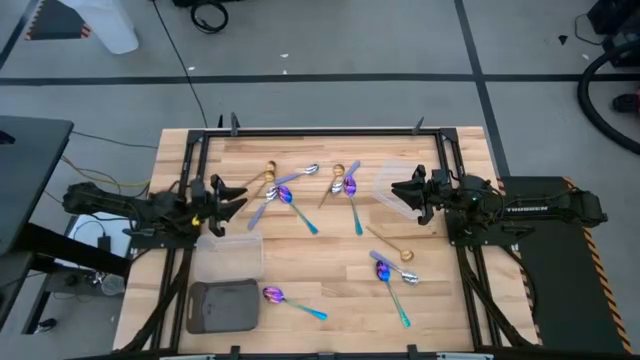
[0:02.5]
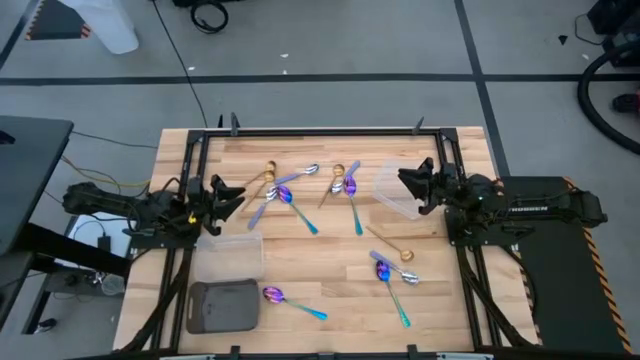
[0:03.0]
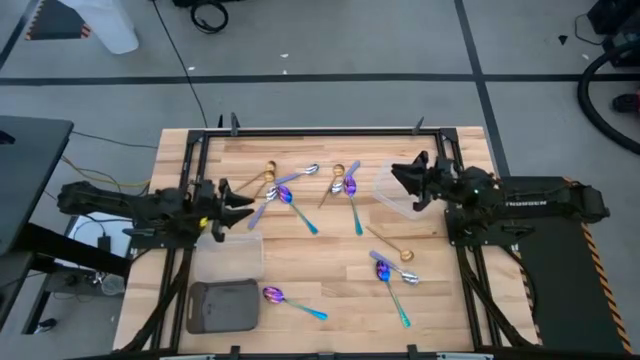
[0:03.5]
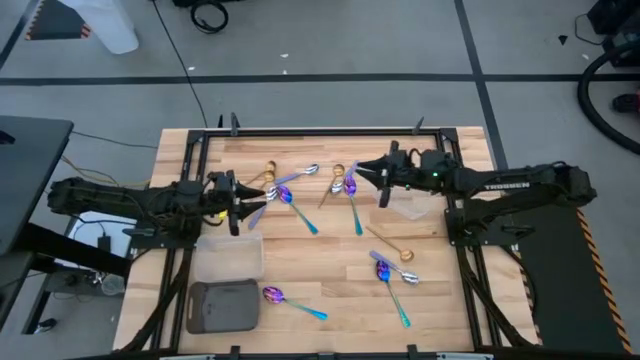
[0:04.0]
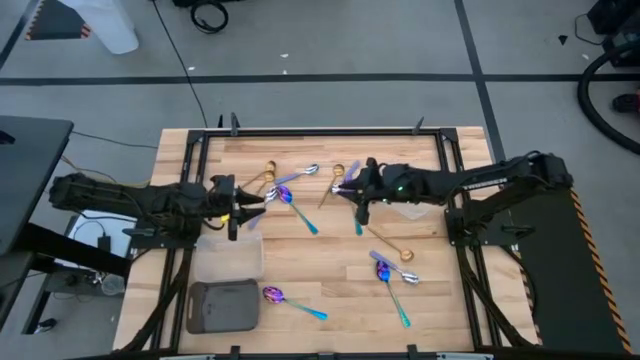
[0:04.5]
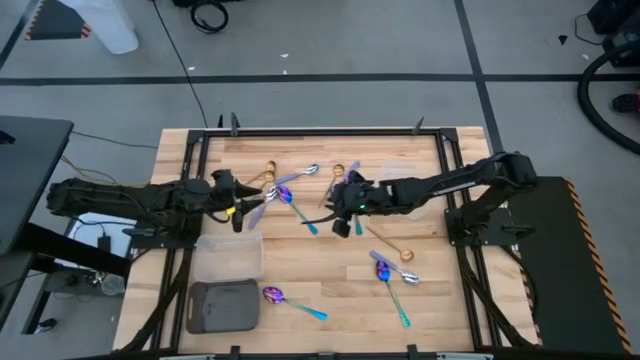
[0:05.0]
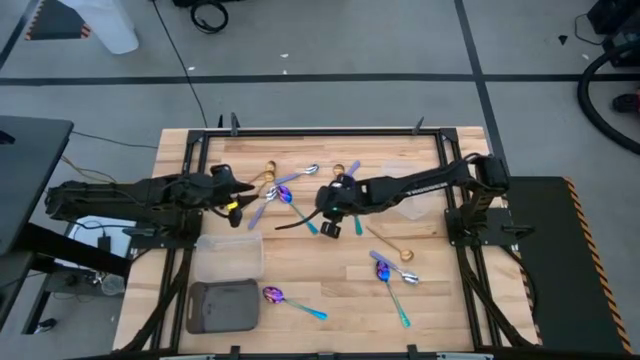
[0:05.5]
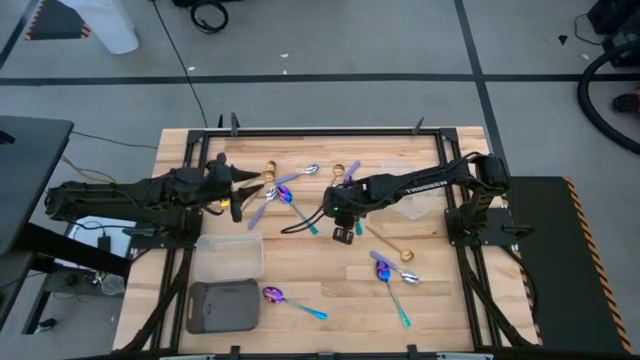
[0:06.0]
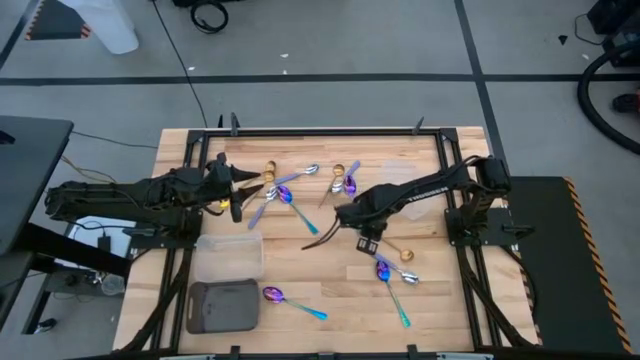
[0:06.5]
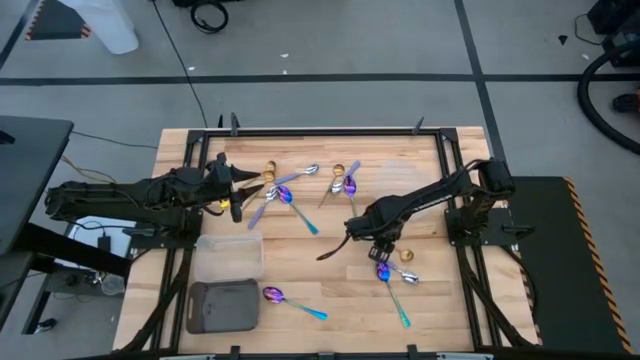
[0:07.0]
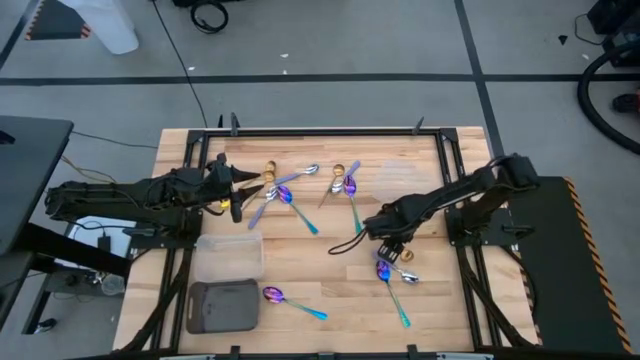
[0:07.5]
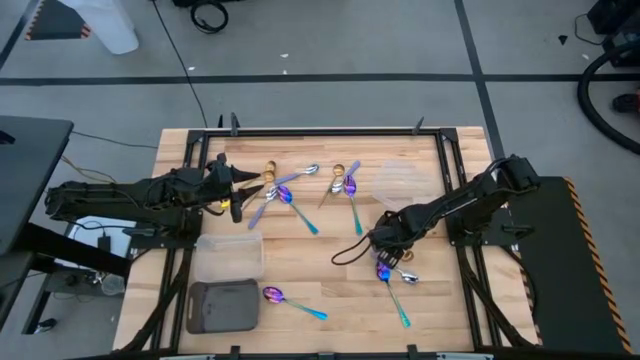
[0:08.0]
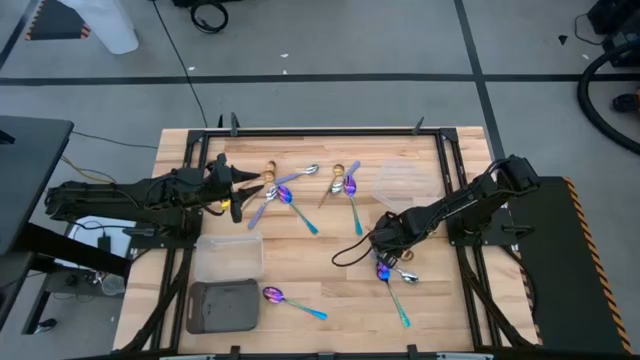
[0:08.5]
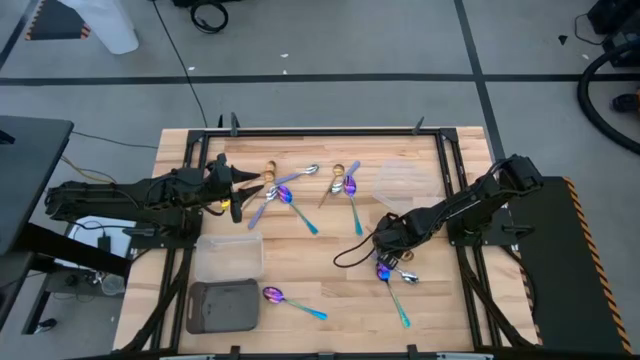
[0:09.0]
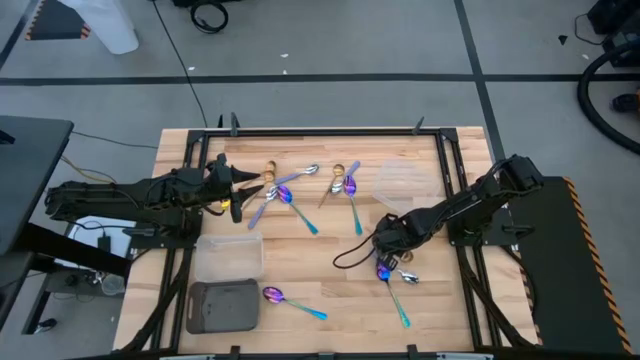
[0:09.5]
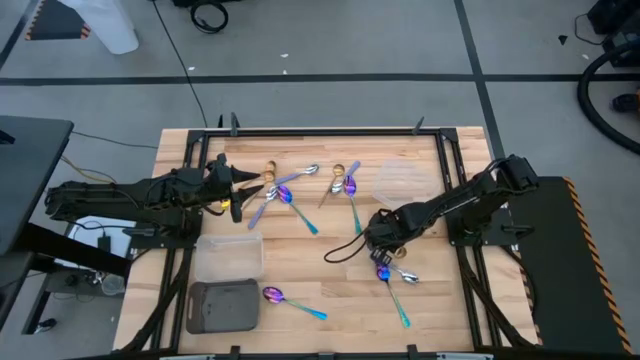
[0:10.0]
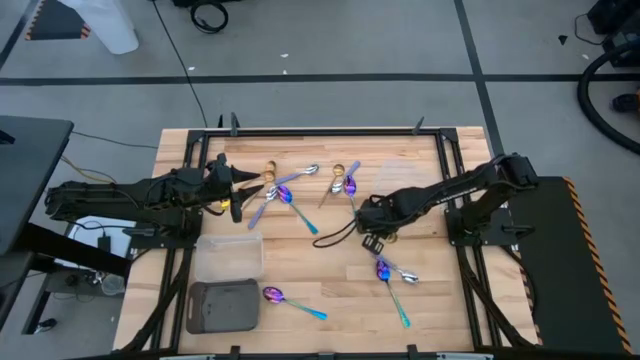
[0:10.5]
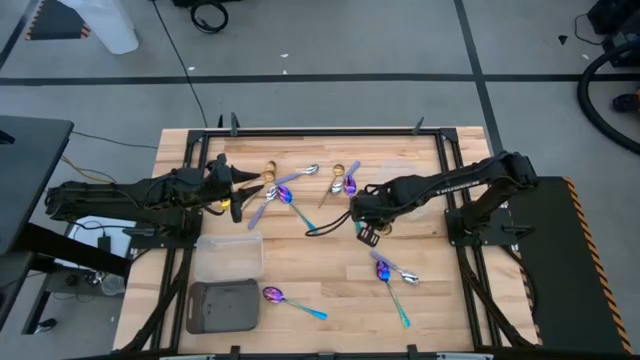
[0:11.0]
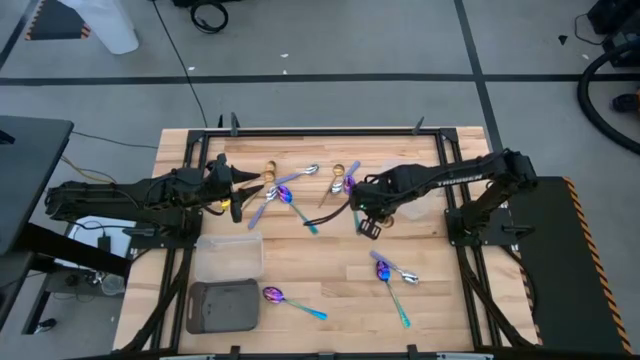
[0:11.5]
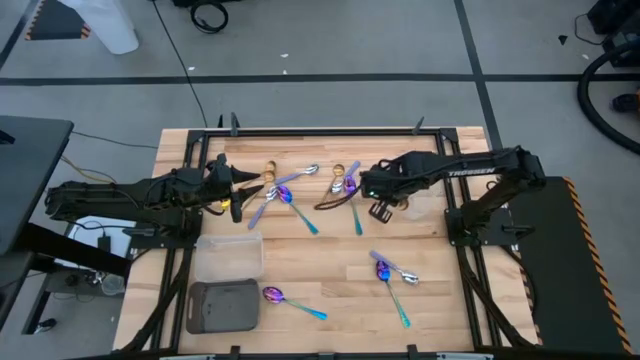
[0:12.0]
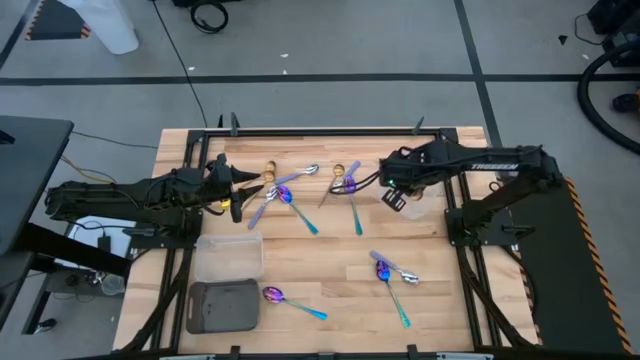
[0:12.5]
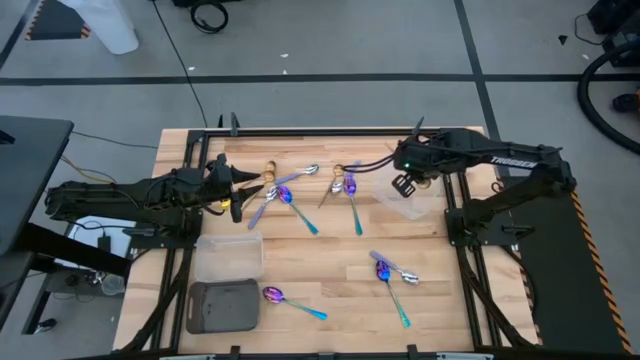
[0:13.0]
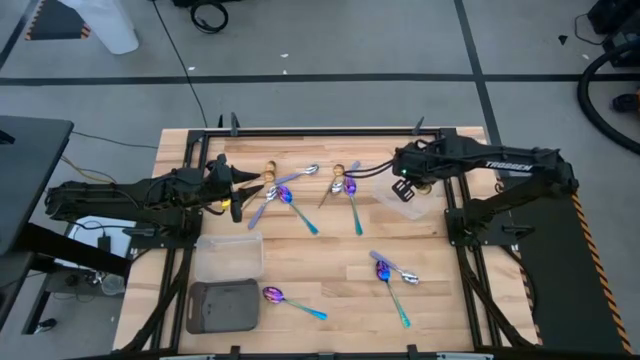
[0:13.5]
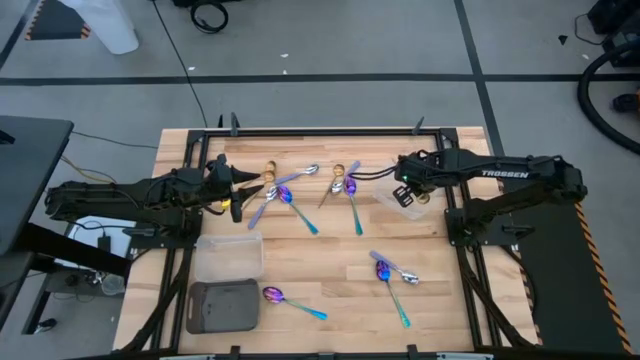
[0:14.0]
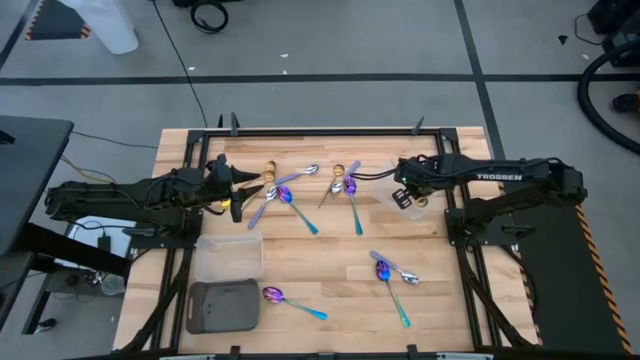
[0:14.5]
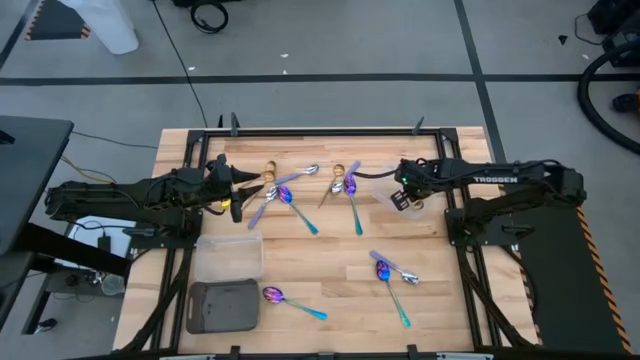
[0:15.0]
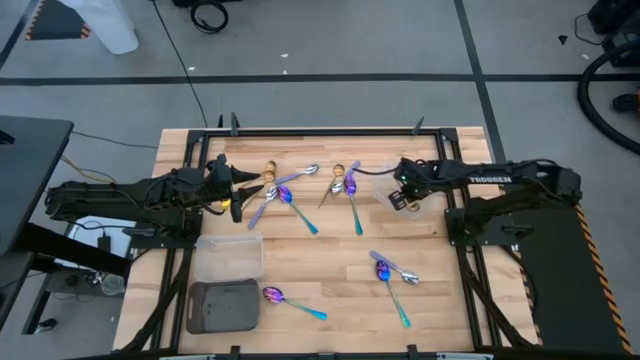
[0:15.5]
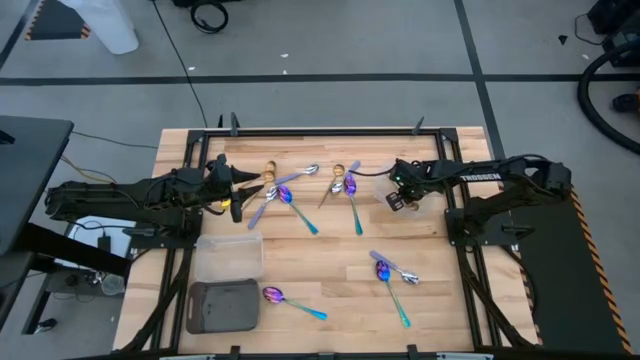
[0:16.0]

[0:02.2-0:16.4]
Task: Sort silverware by color (type)
Put the gold spoon into the top transparent bin

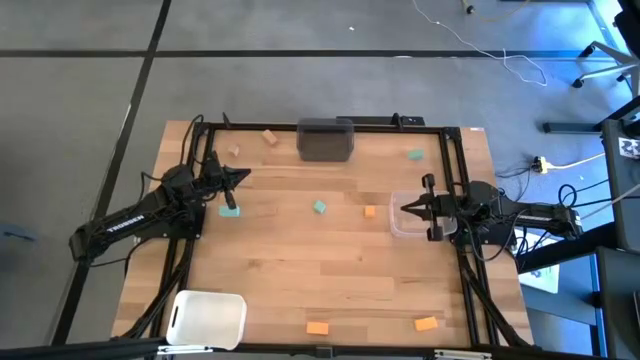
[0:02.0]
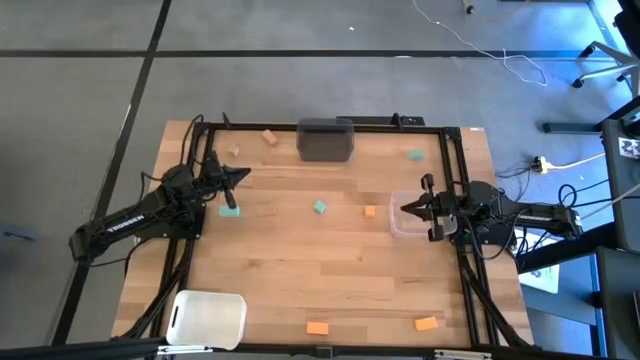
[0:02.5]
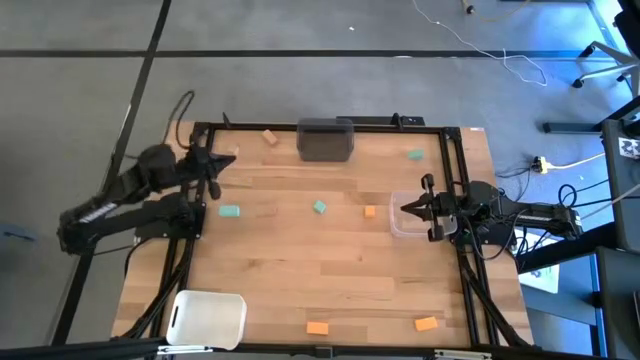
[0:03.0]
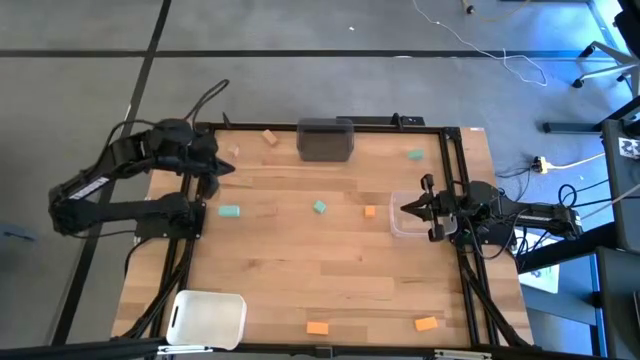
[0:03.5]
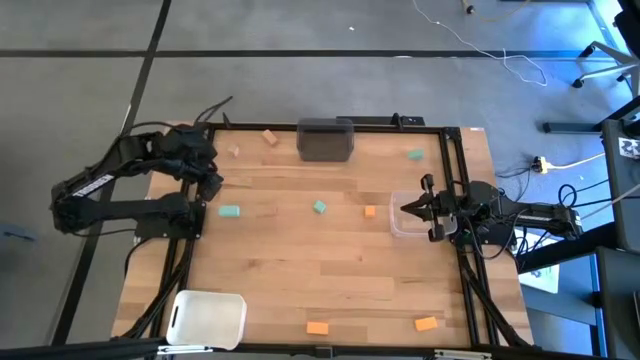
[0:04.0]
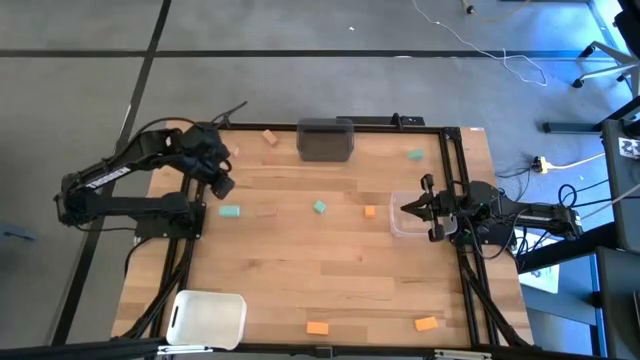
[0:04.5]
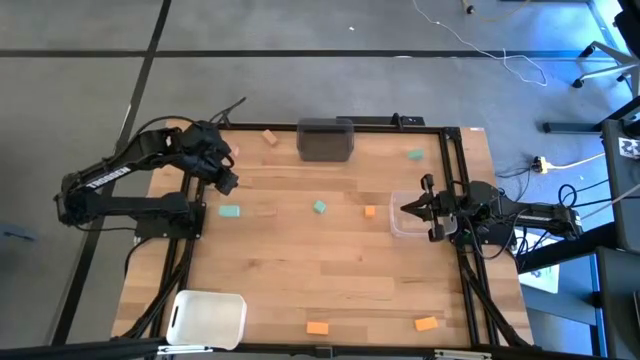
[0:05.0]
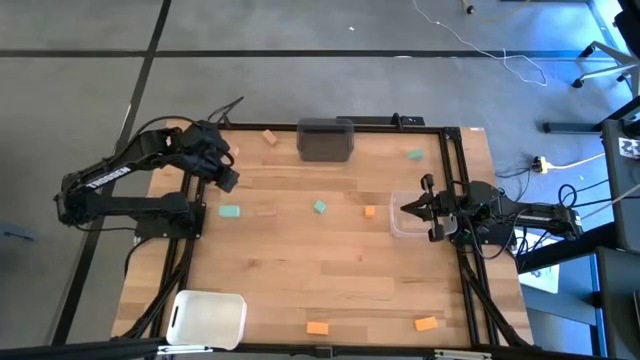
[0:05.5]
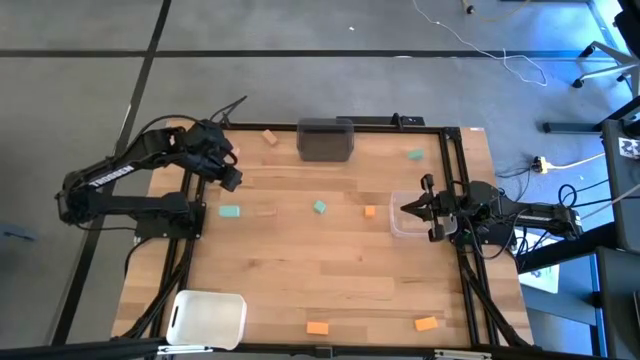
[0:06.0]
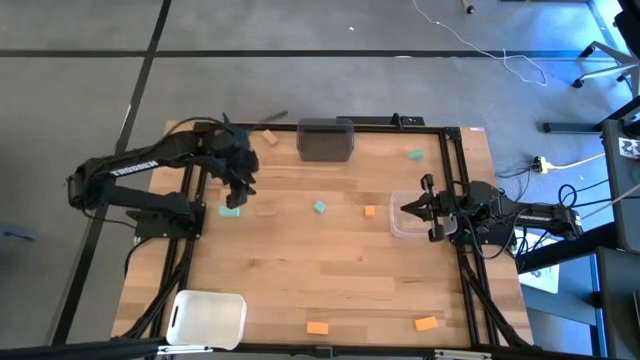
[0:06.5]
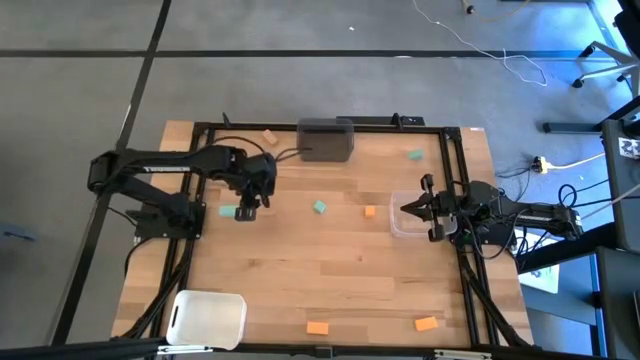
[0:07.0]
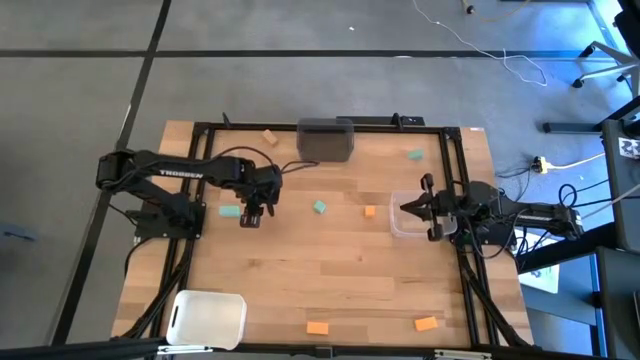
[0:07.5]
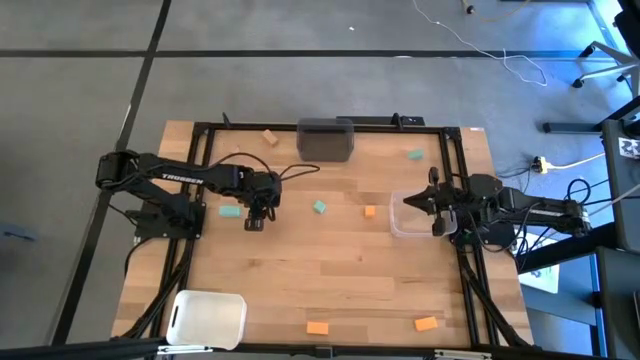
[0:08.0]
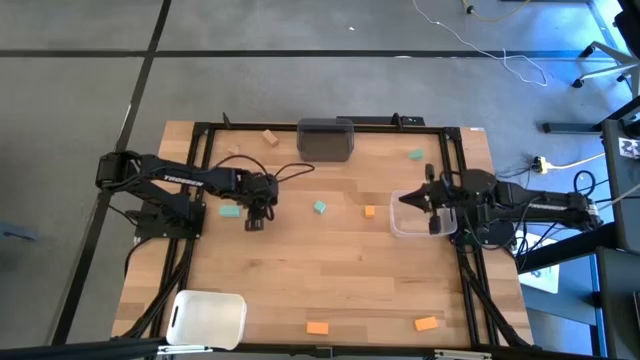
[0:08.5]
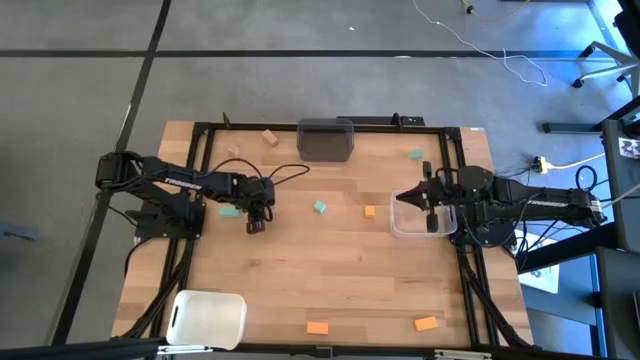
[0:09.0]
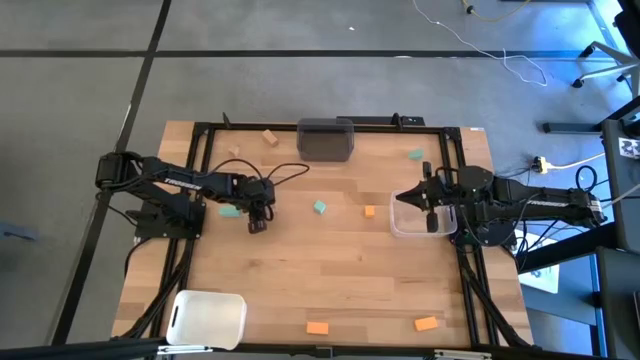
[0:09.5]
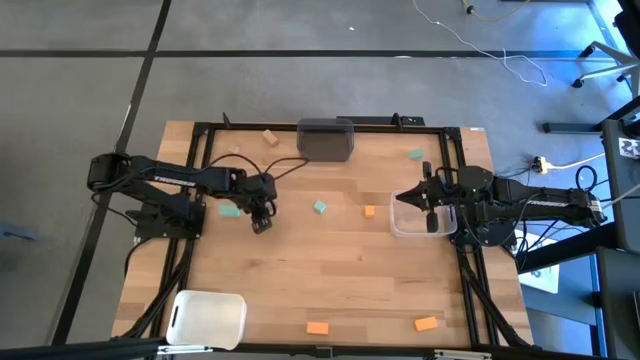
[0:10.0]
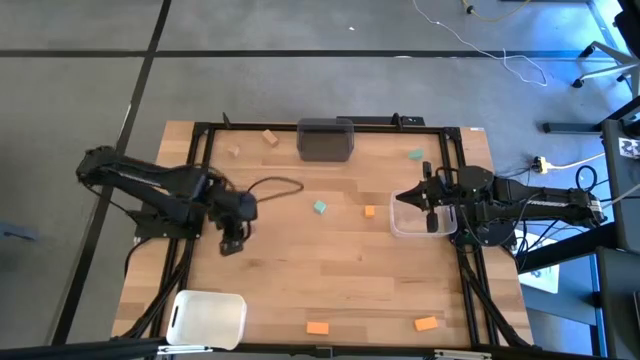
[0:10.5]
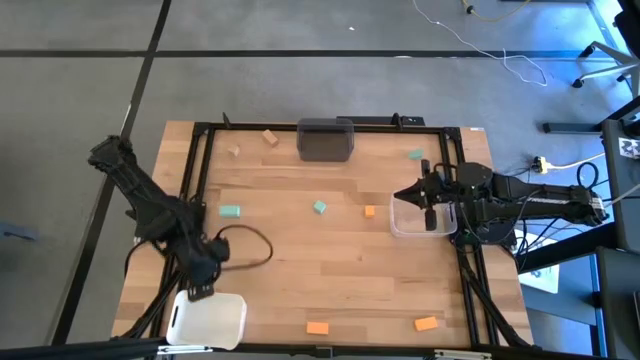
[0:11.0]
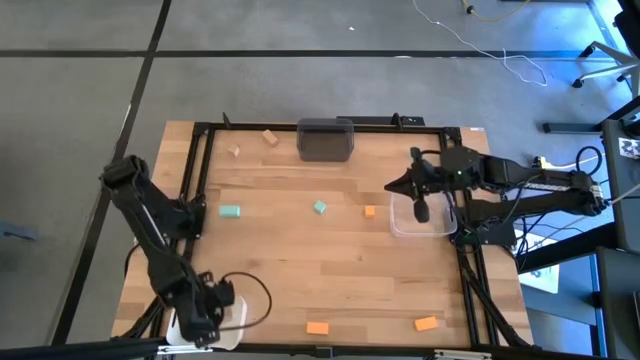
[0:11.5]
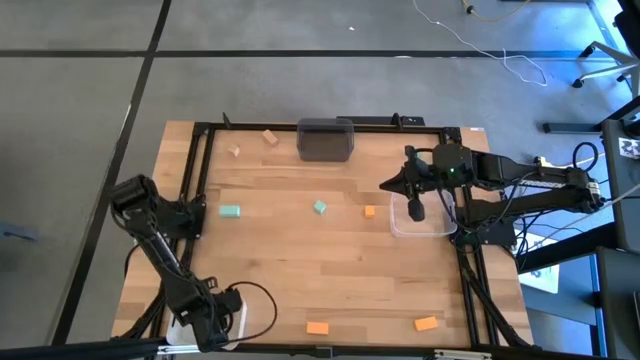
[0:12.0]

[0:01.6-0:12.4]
Task: Sort & place blocks by color
Put the bottom brown block into the white bin
